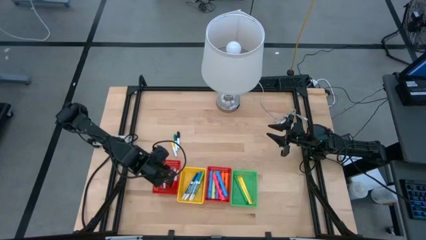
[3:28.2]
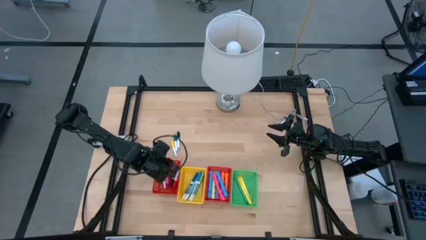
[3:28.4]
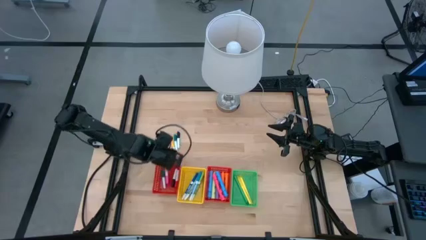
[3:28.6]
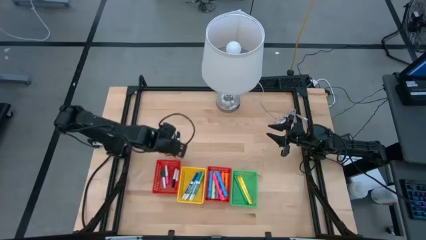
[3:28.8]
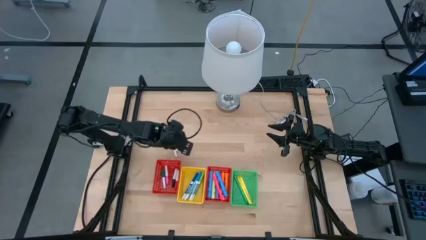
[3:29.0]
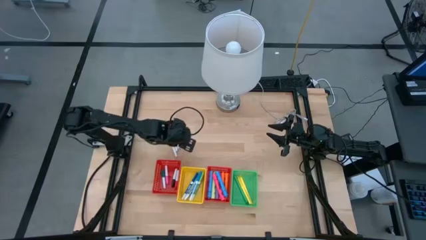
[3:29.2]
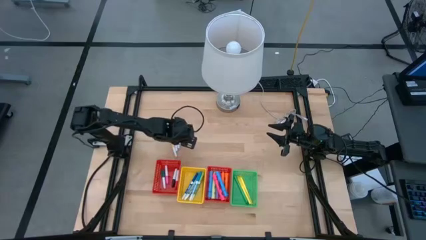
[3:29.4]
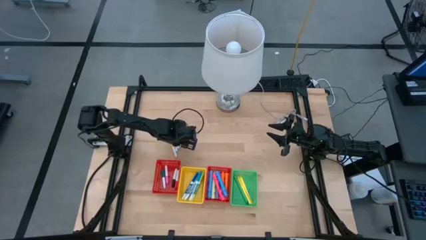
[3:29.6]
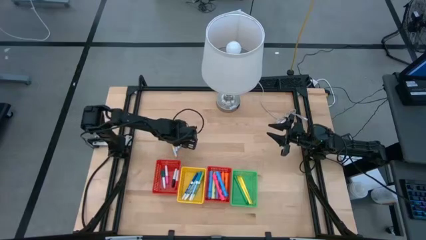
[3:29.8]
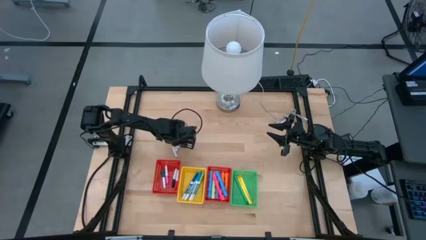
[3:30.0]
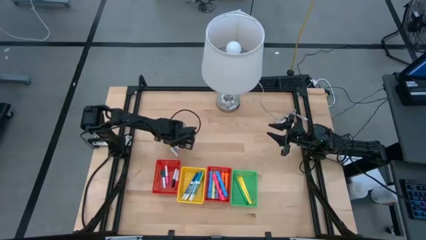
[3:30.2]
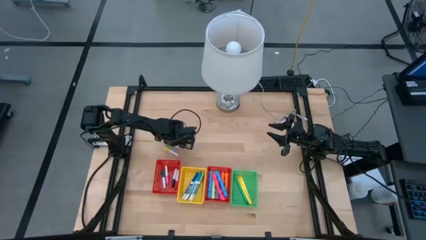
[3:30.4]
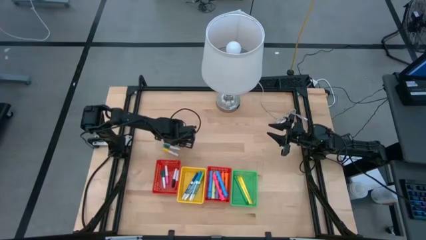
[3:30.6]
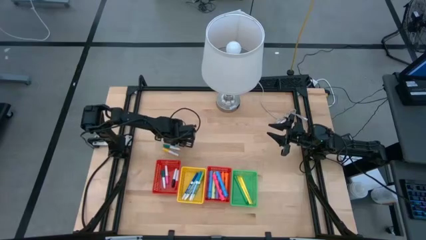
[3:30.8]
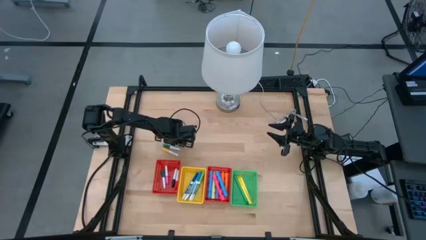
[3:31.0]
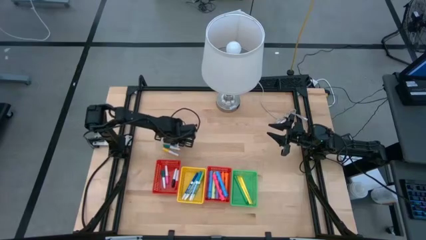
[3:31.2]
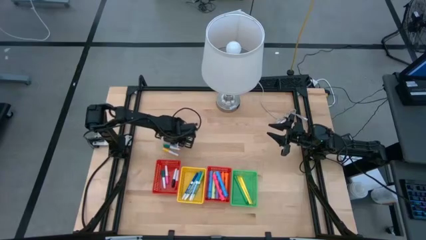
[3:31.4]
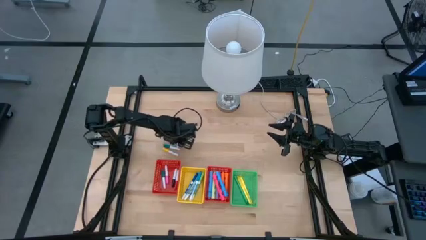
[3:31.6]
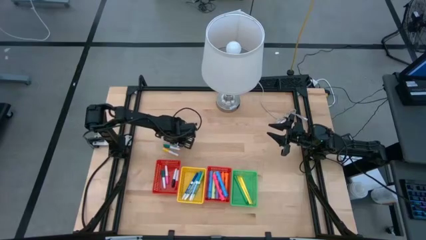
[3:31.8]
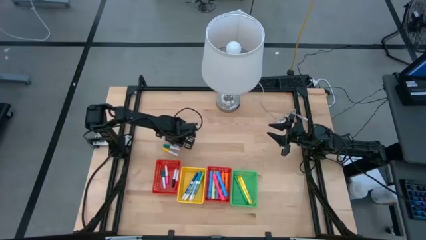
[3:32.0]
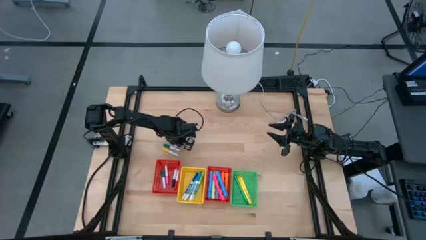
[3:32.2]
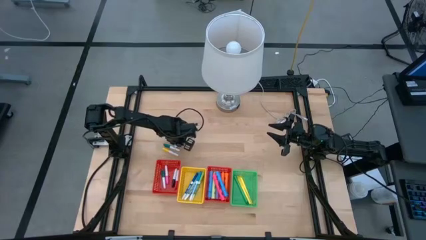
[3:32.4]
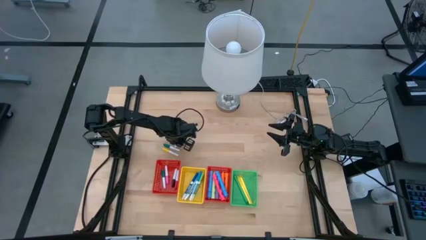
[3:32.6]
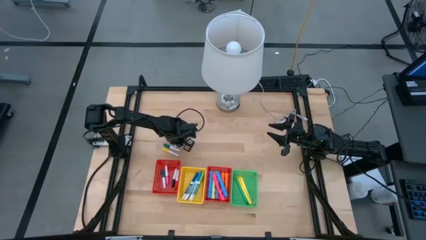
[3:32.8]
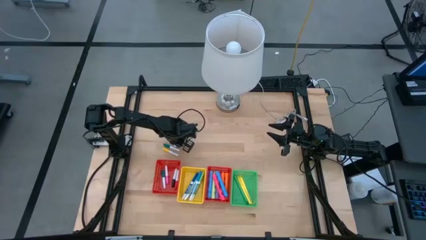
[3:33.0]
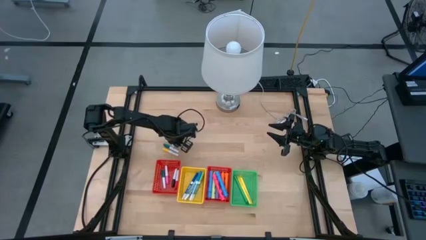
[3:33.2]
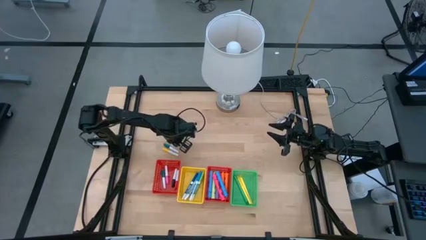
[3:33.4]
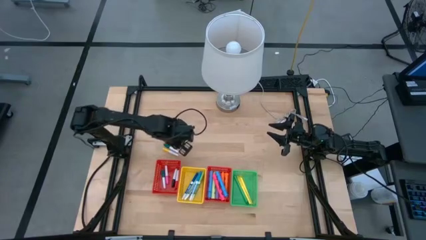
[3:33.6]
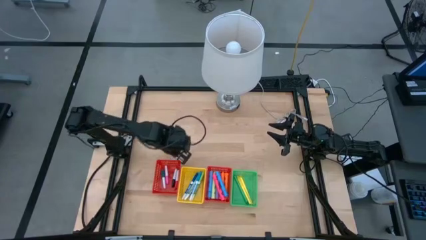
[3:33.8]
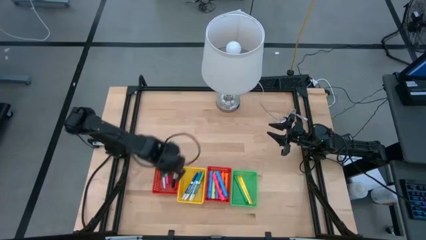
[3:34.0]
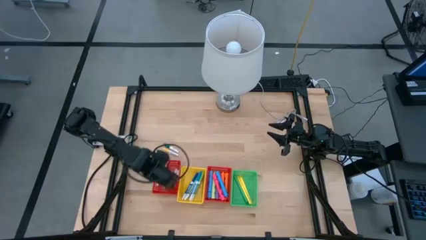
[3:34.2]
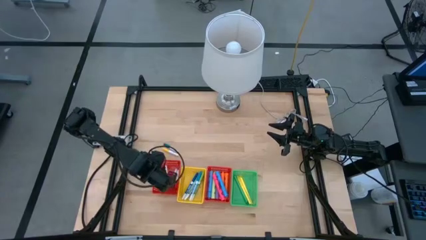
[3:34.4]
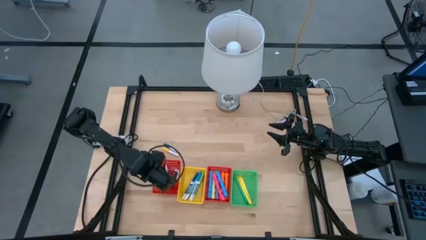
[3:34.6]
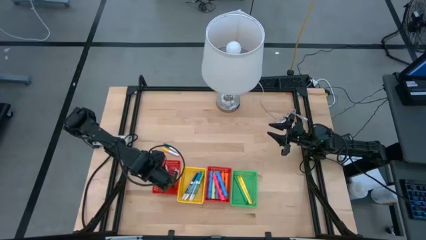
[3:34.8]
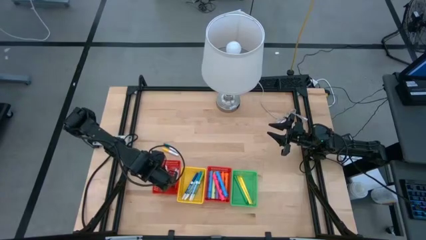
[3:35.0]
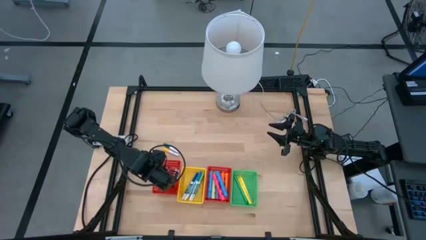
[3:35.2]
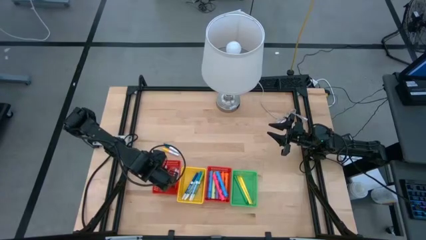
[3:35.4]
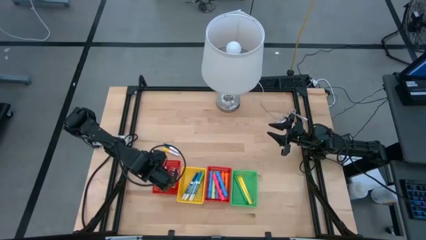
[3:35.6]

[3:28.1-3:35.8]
Task: Pick & Place Markers
Put the small black highlighter into the left red bin

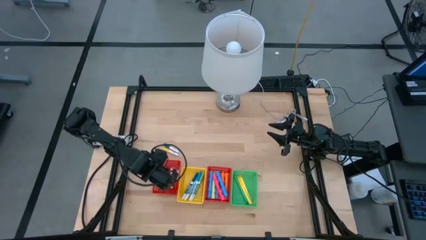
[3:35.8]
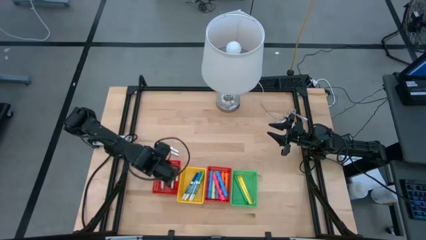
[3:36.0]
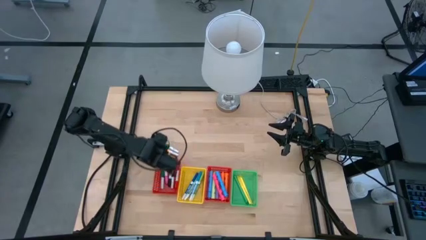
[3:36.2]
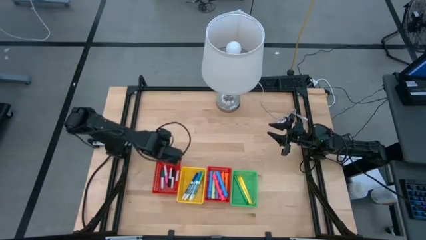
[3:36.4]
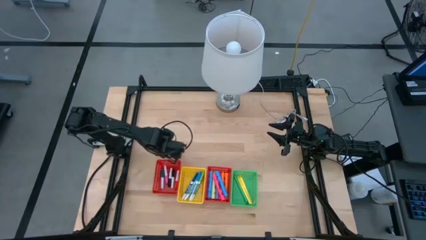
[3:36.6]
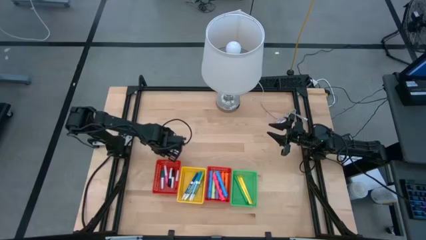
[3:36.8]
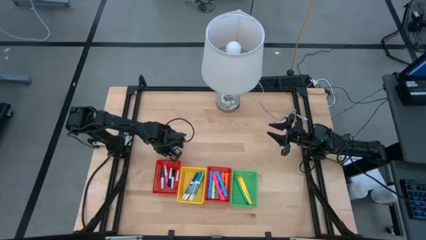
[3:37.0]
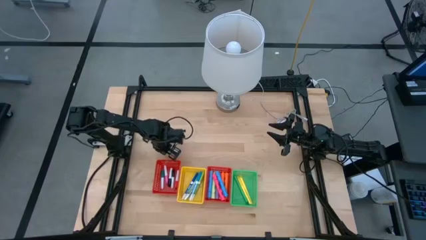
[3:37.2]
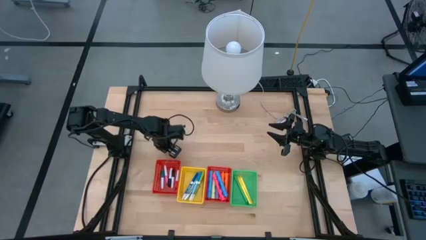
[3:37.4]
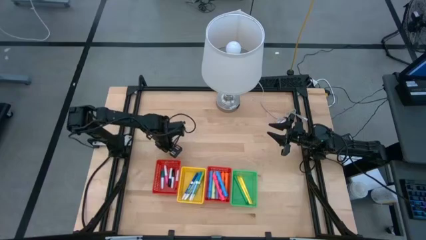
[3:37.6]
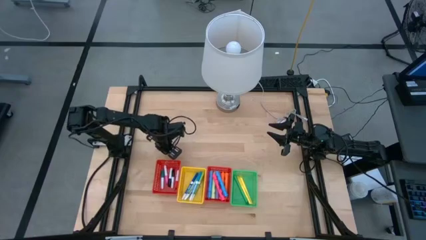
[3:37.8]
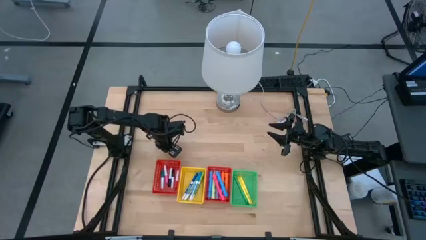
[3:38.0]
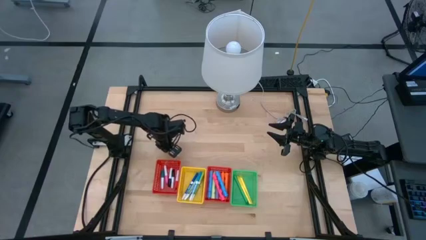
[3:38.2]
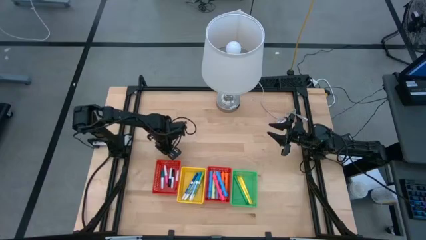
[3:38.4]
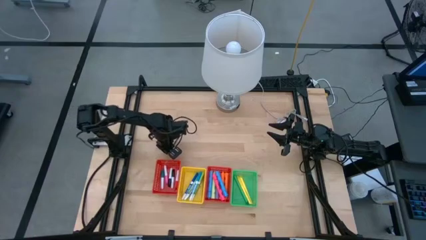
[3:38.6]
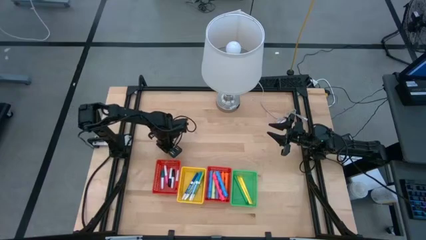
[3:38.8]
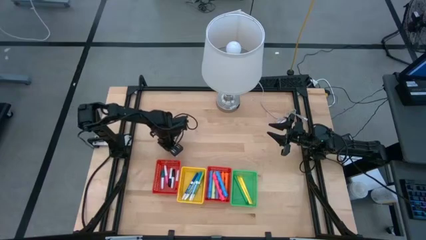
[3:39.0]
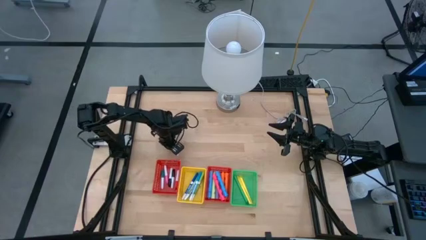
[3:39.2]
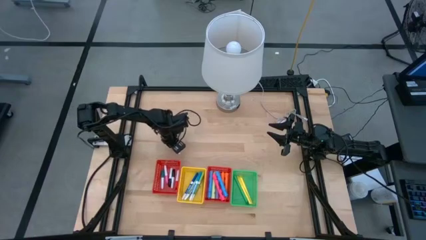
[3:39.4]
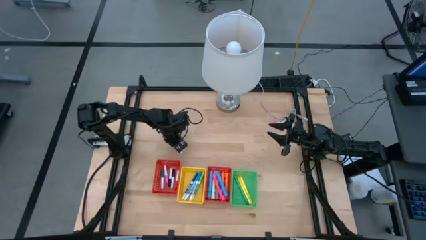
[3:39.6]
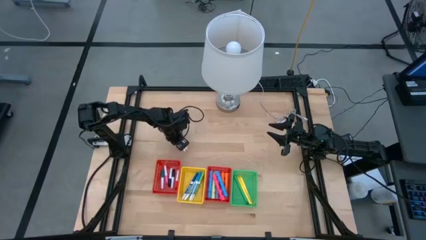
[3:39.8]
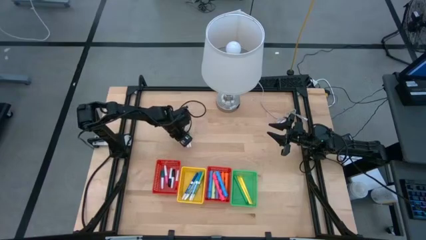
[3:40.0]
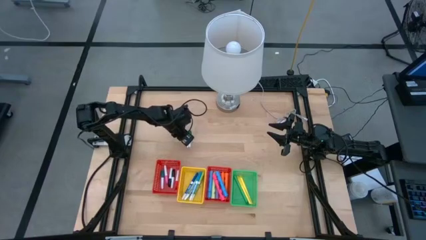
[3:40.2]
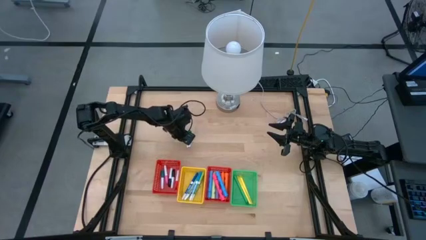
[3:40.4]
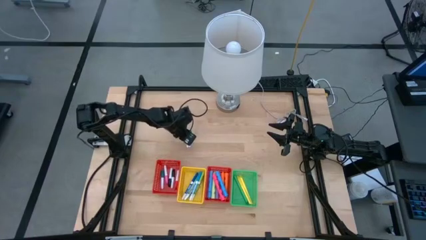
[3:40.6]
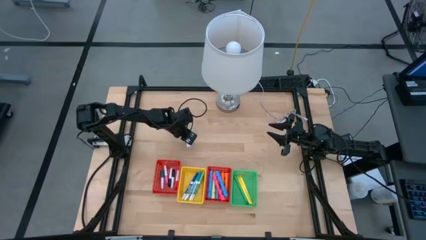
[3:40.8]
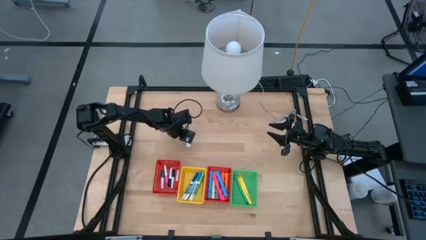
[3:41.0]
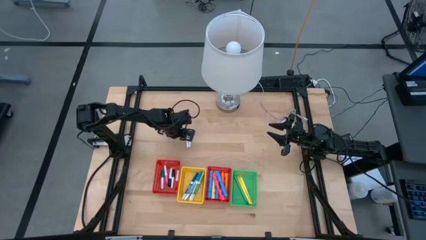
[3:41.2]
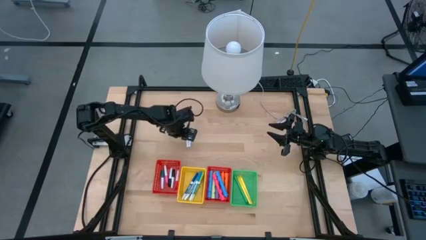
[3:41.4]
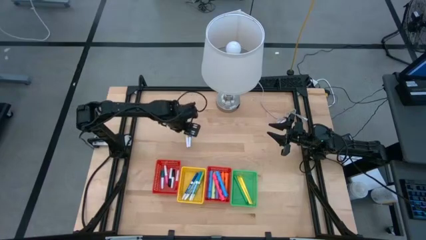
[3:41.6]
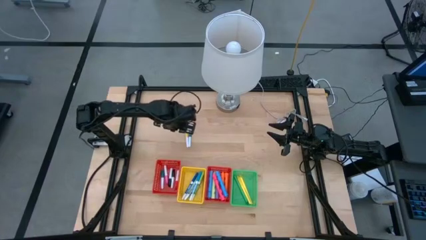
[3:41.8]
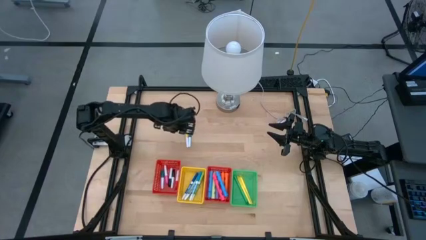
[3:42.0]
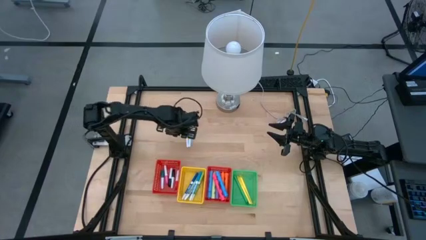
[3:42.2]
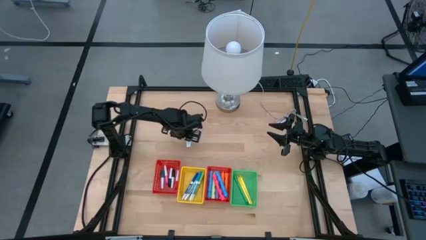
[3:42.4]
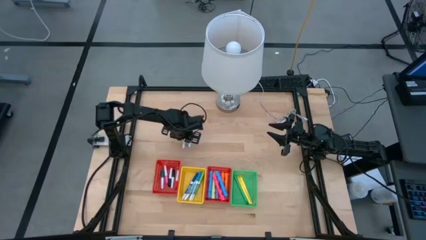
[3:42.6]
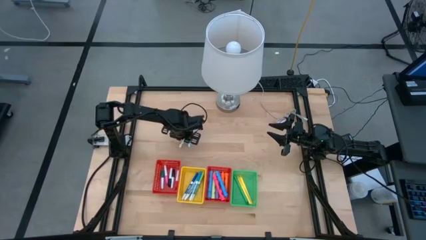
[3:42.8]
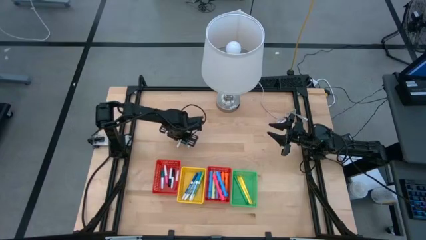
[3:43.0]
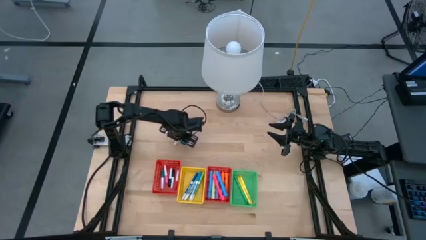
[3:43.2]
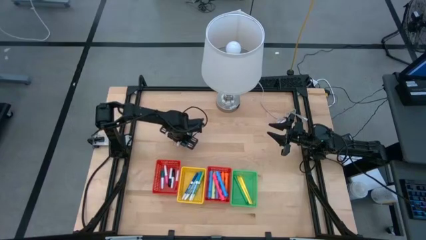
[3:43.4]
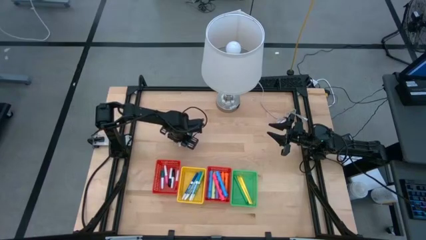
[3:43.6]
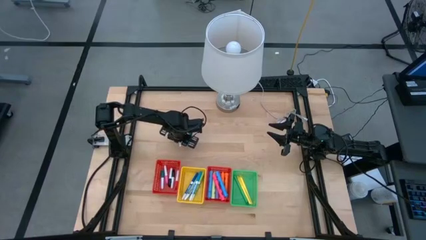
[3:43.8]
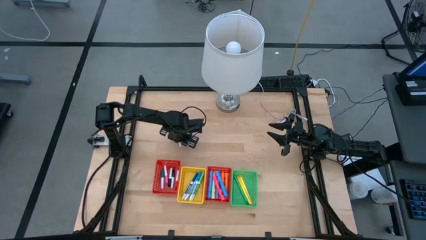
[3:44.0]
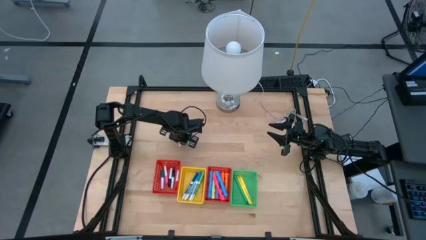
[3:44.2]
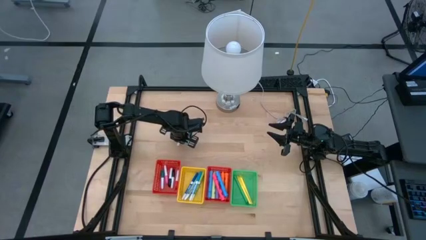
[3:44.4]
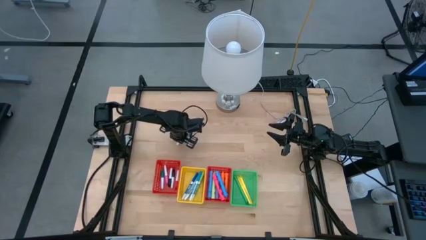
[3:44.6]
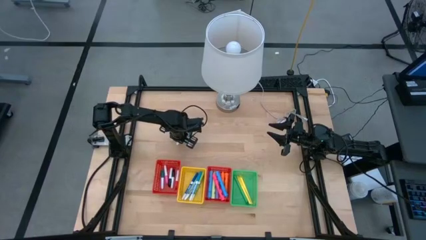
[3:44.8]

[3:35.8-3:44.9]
Put the small yellow highlighter into the left red bin
